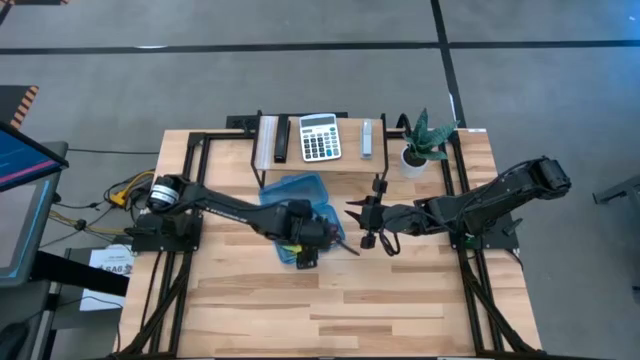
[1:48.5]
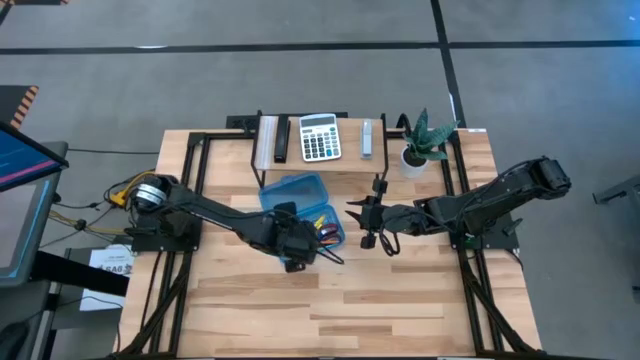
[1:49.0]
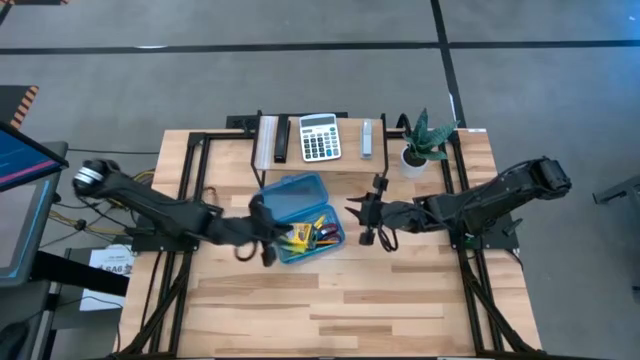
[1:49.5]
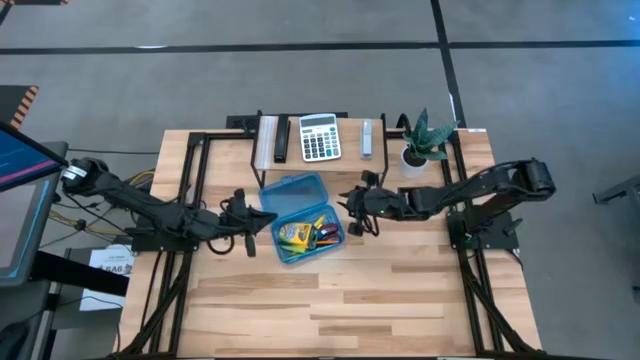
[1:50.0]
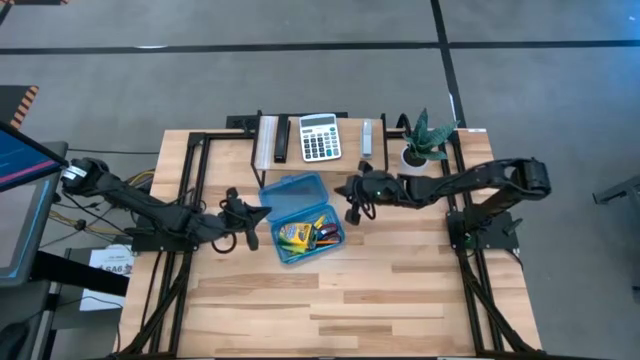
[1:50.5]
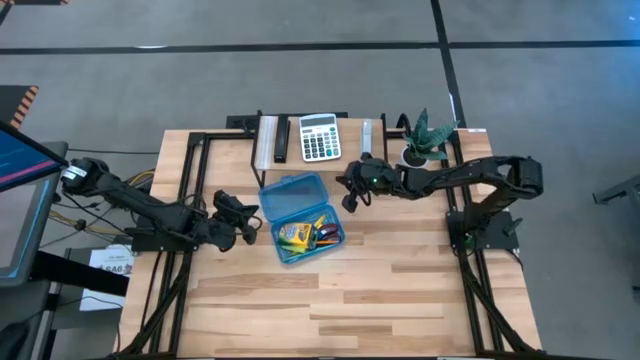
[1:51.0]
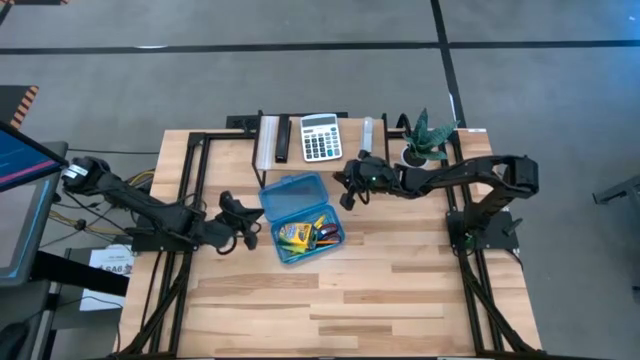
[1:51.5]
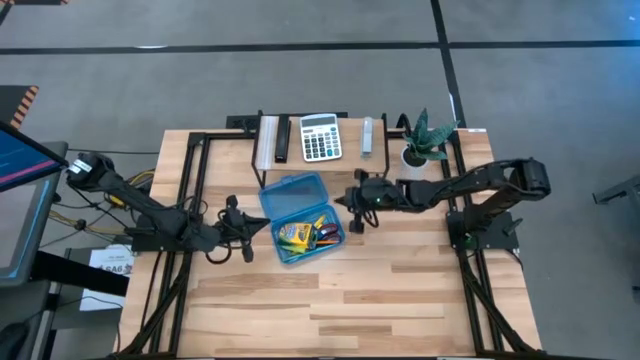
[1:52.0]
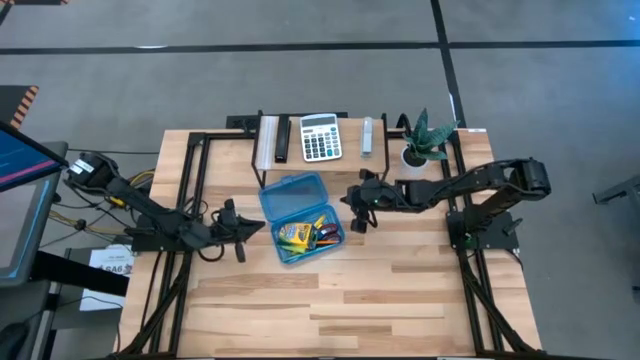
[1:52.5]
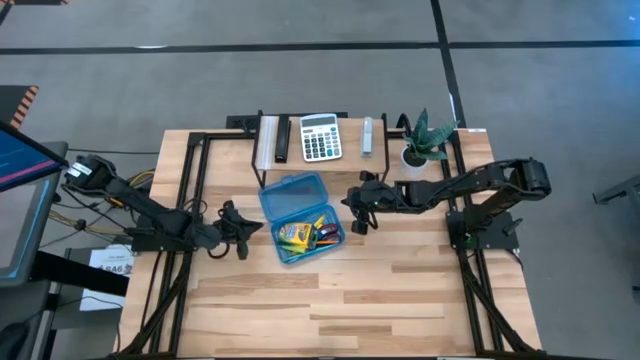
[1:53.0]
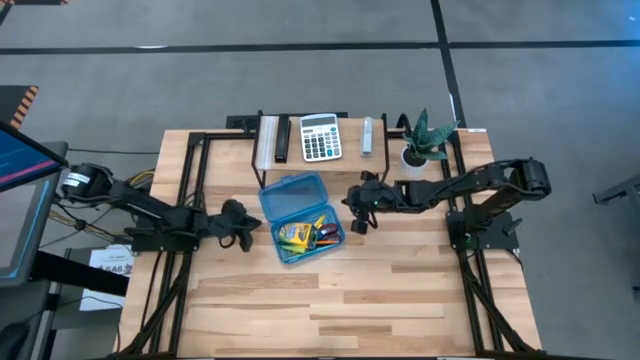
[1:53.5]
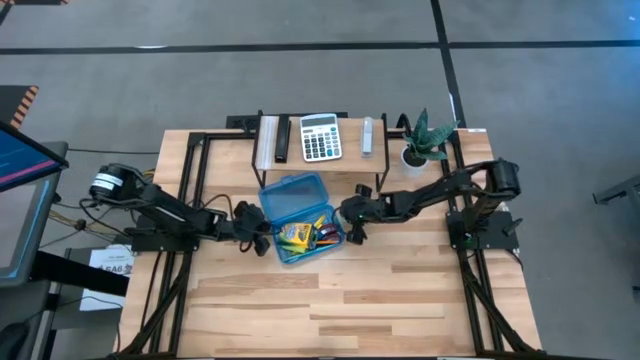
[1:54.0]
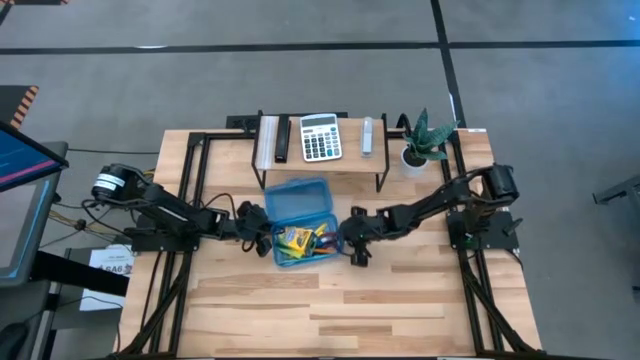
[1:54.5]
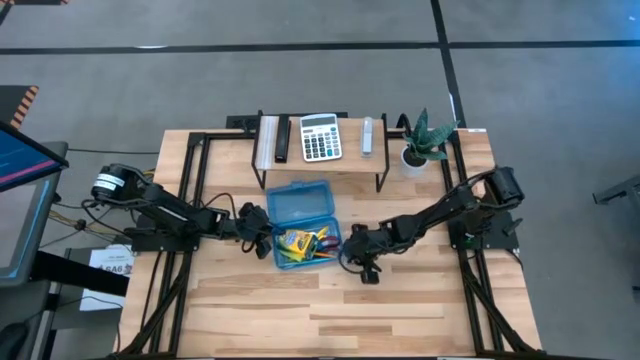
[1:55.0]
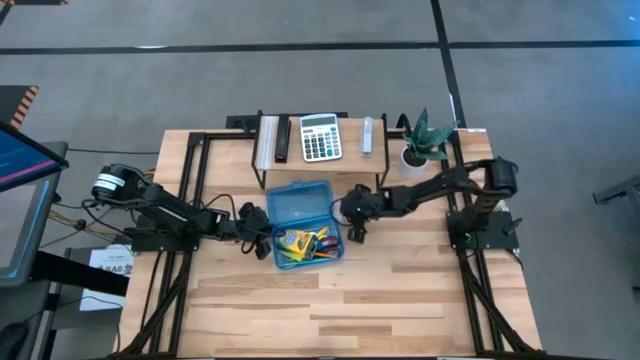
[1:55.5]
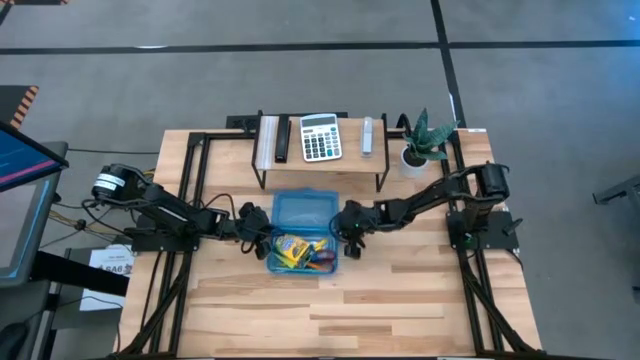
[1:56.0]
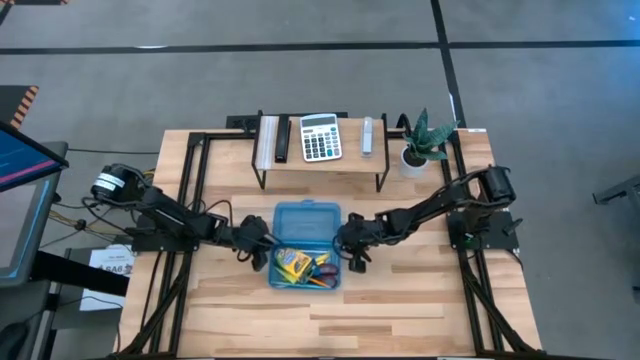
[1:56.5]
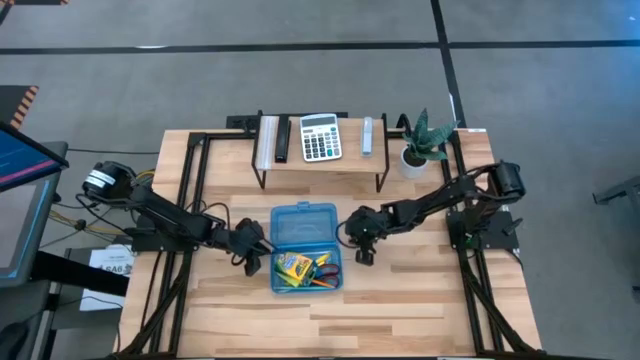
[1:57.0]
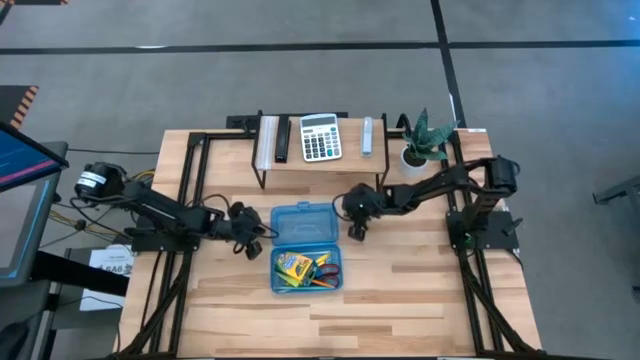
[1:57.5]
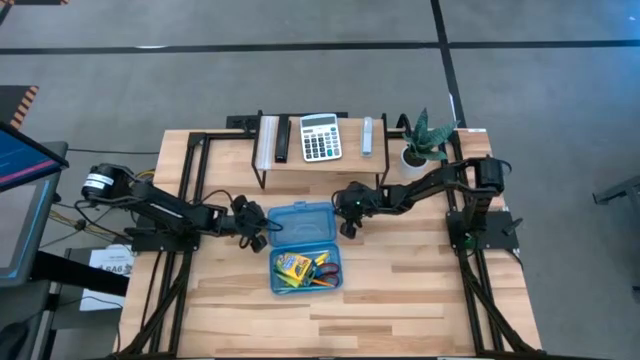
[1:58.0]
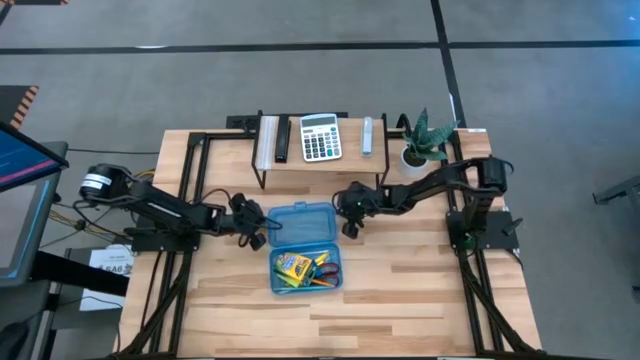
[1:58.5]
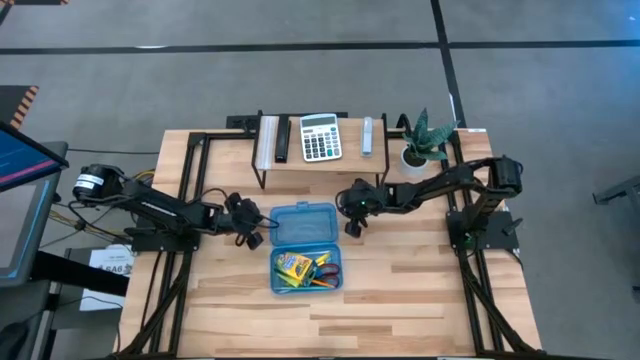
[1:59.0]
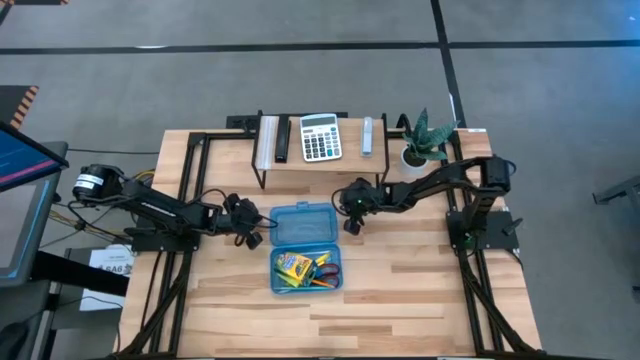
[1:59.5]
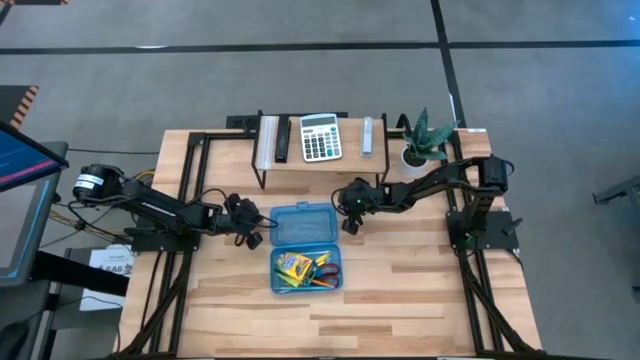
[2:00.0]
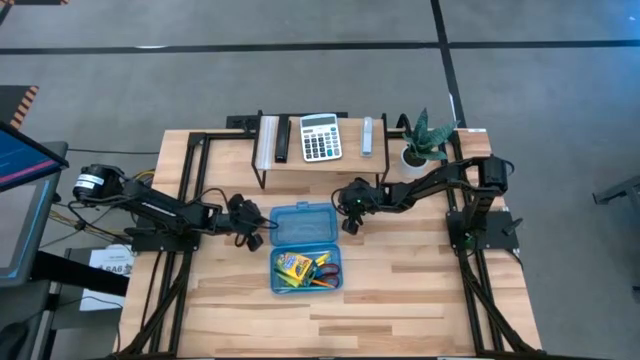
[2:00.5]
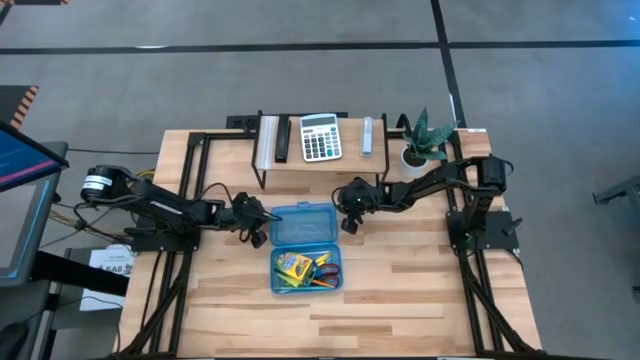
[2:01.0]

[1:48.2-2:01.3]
Task: Pack school essentials
Close the supply box

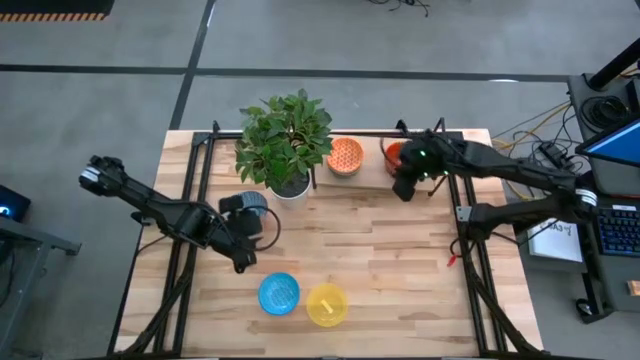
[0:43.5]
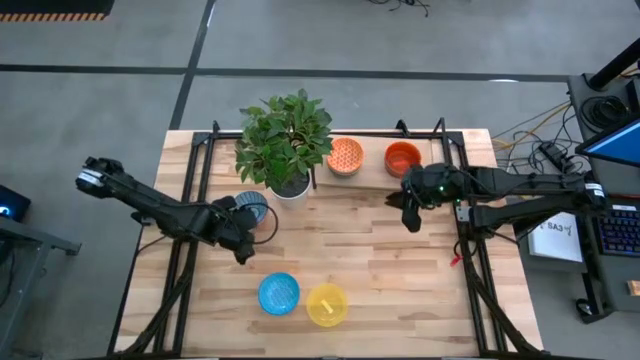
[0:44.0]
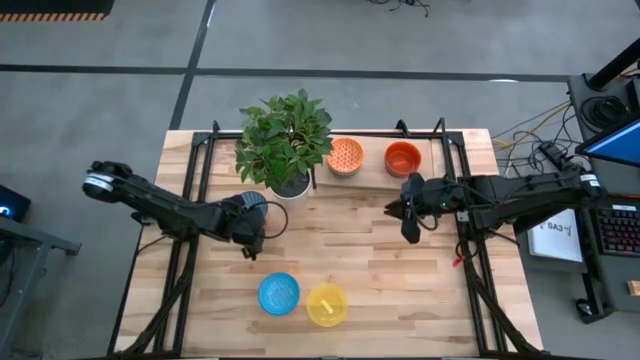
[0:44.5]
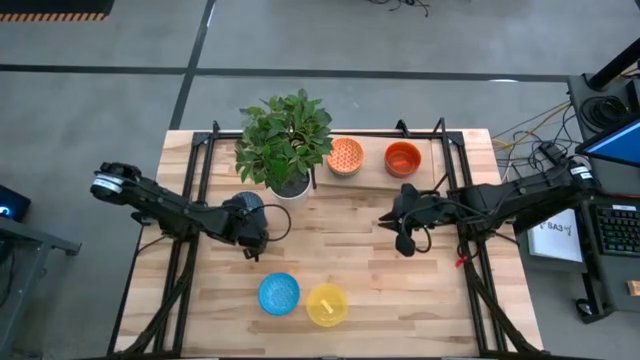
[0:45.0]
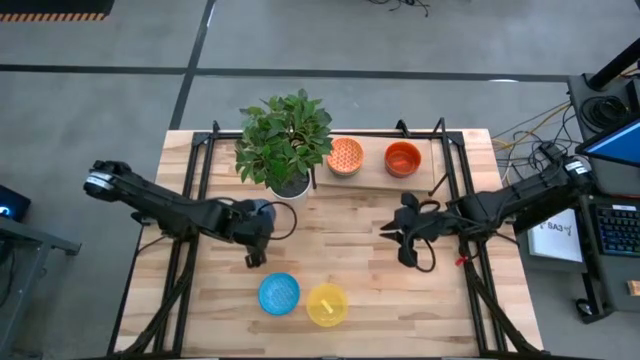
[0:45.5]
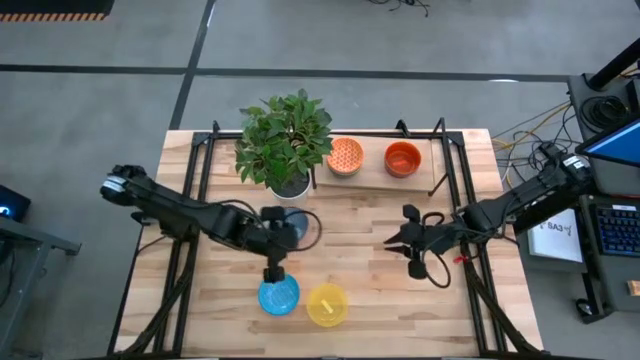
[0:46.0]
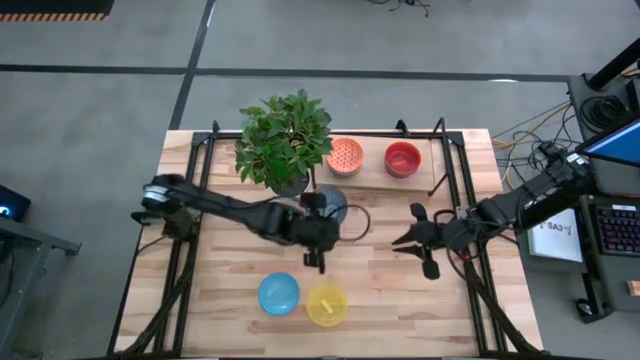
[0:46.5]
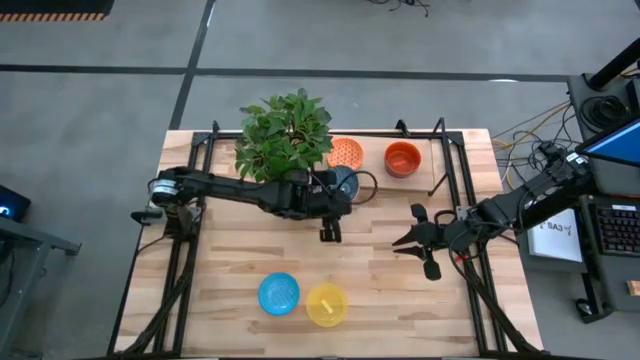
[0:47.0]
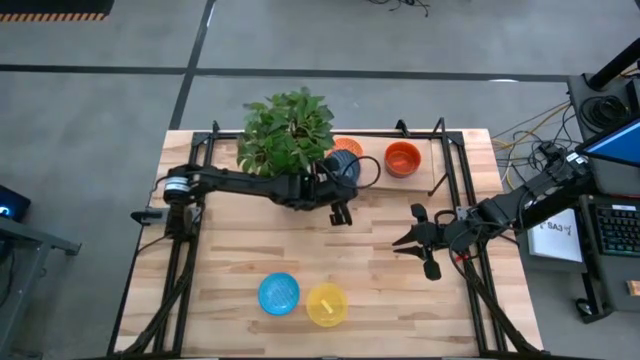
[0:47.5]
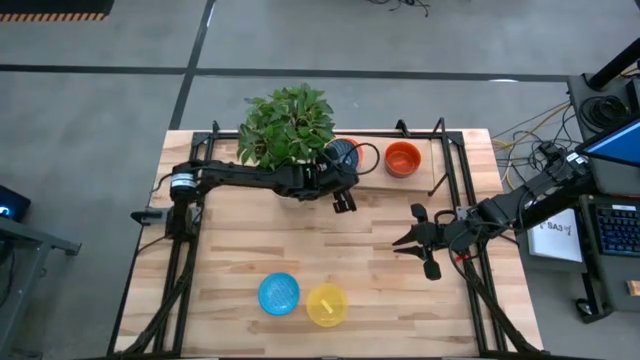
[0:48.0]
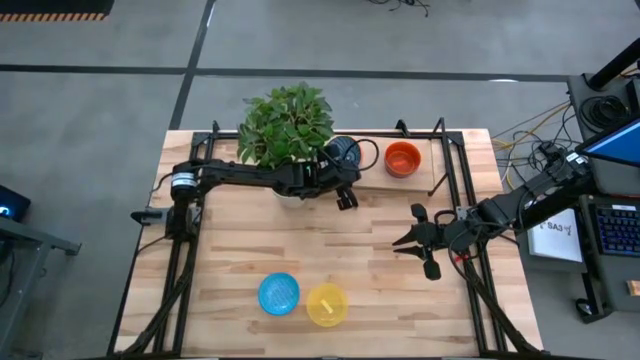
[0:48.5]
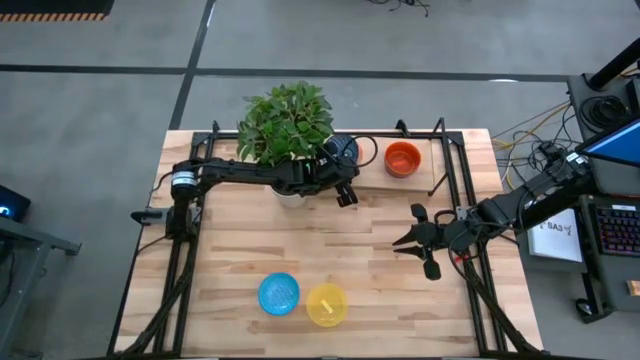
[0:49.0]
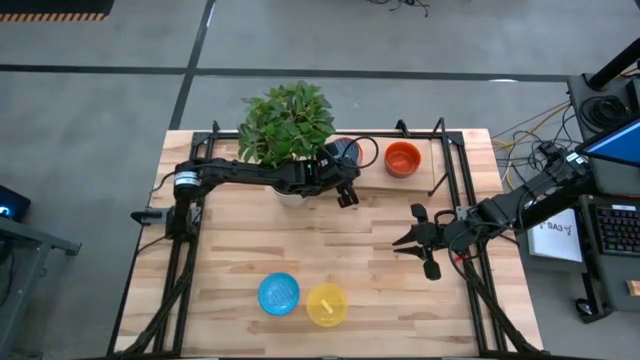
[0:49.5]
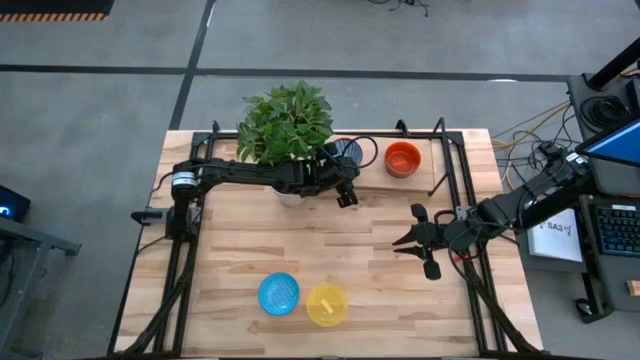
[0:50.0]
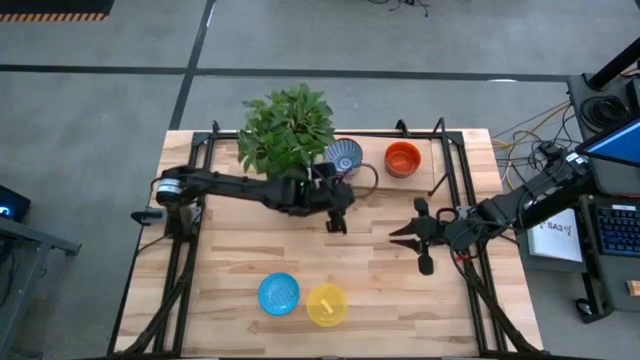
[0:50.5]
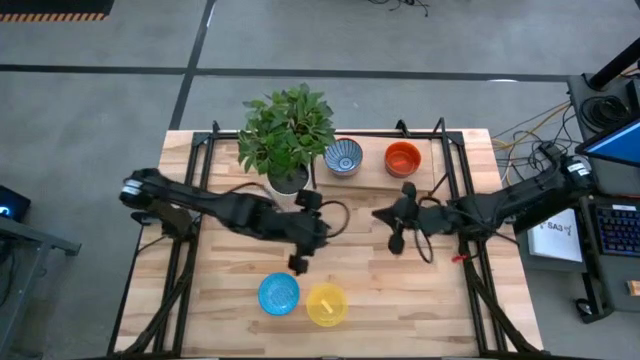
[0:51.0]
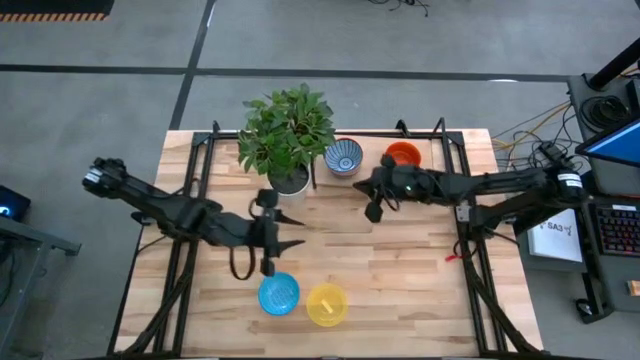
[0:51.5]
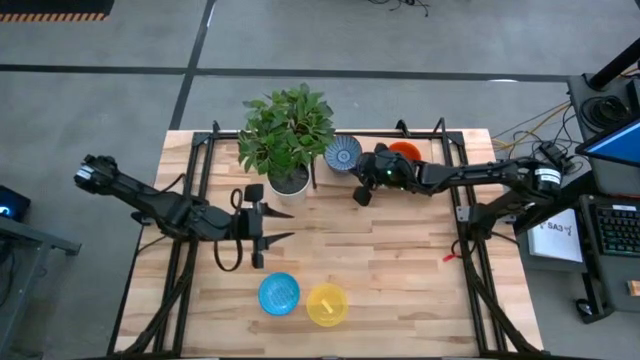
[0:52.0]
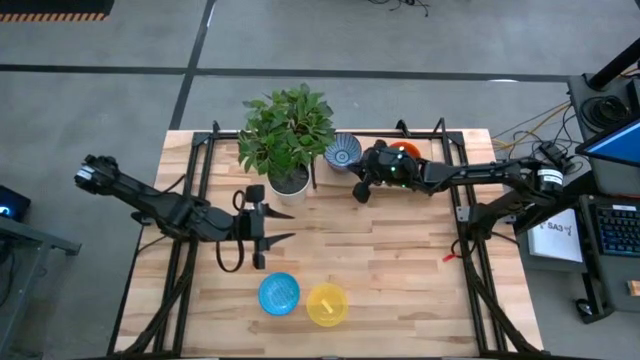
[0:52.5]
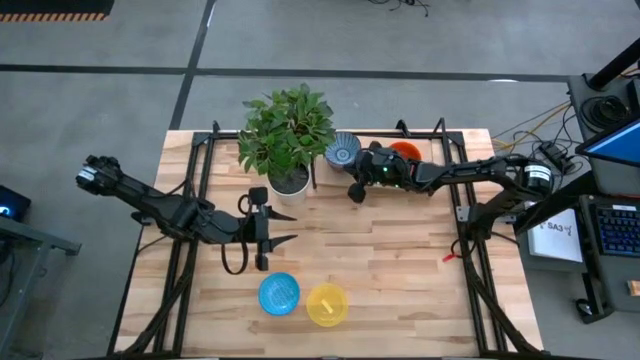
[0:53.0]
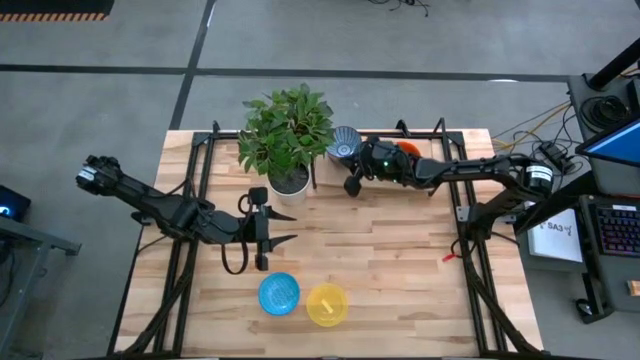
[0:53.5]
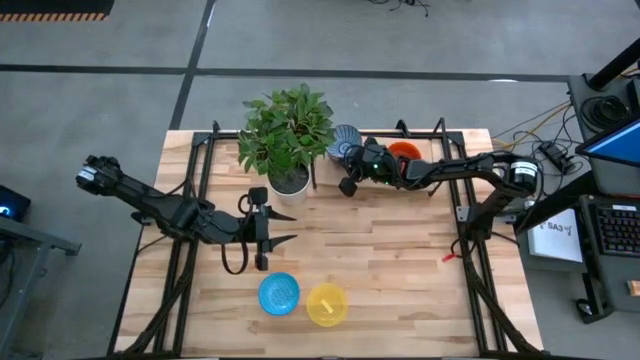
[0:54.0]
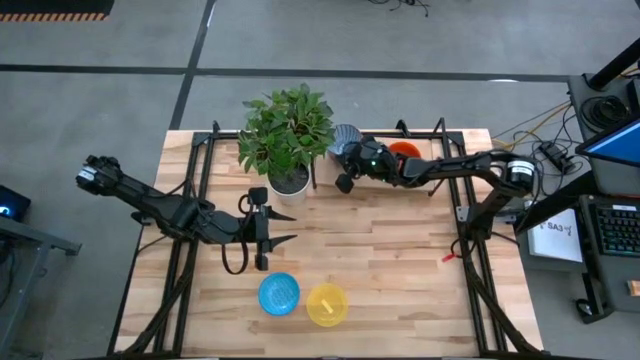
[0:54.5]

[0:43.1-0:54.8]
Task: Place and stack bowls onto a shelf
Stack the dark blue patterned bowl on the orange patterned bowl on the shelf
